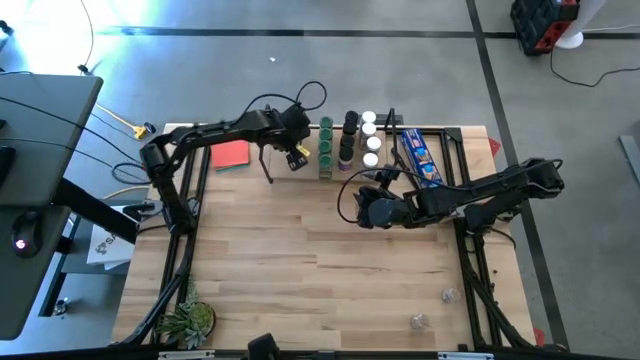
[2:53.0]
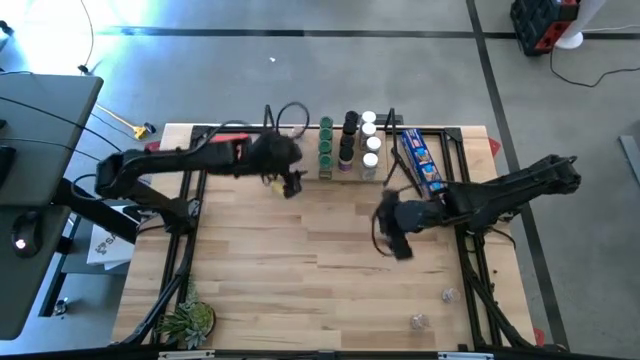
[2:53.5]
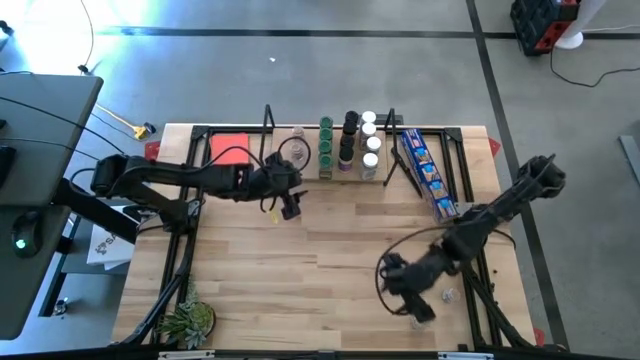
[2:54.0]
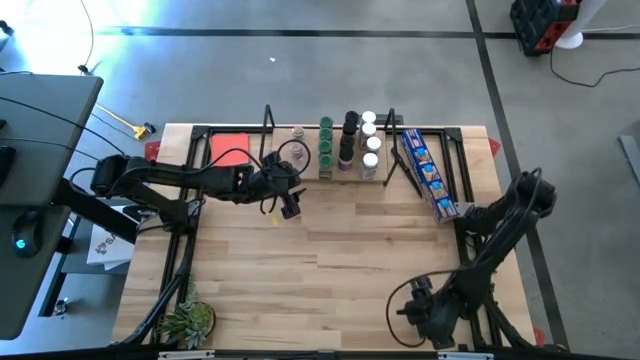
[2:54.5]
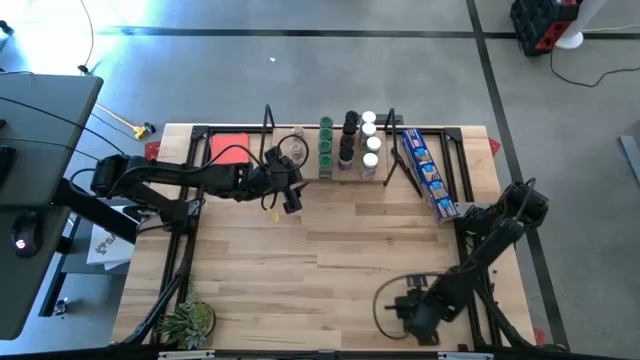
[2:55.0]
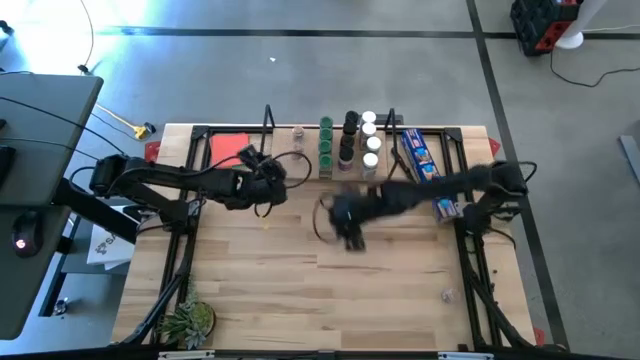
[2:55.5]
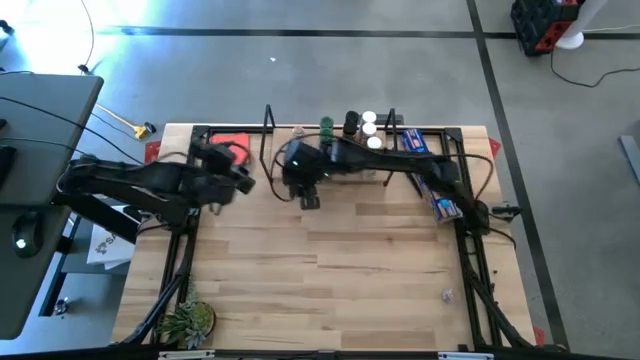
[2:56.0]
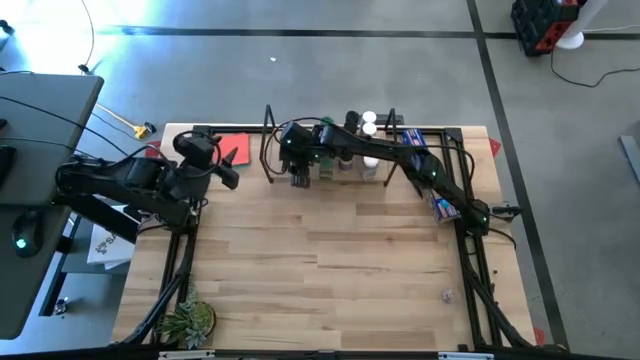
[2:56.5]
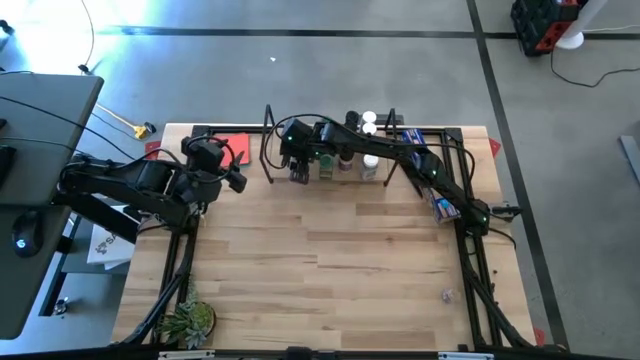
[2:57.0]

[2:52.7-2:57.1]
Task: Shelf spices
Put the left brown seasoning bottle on the shelf aligned with the other brown seasoning bottles

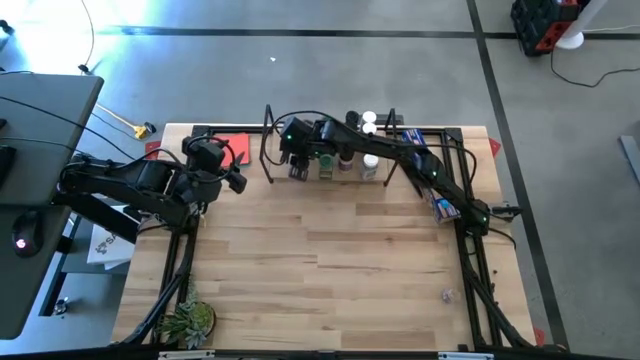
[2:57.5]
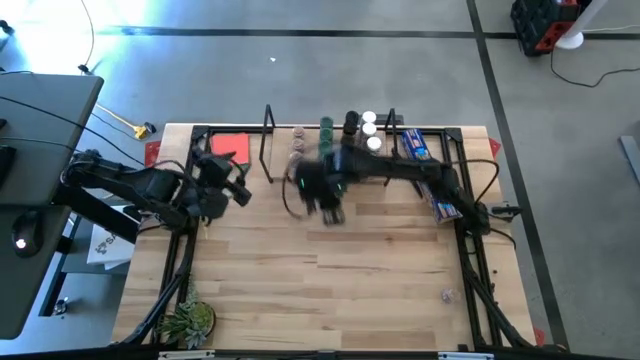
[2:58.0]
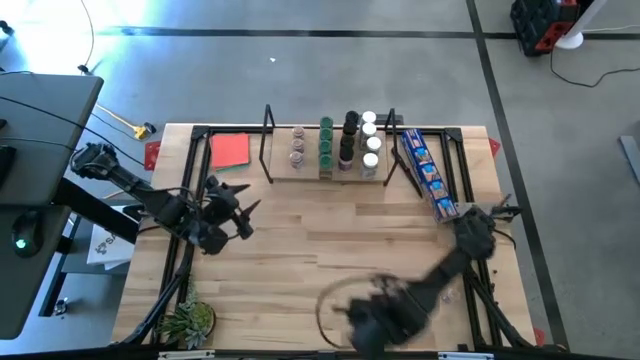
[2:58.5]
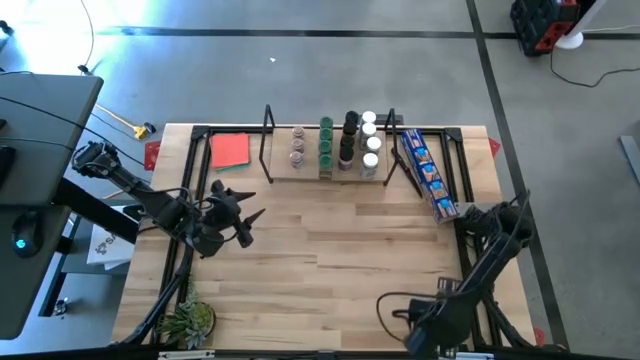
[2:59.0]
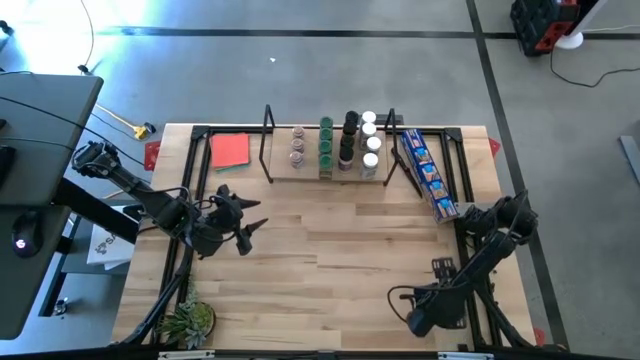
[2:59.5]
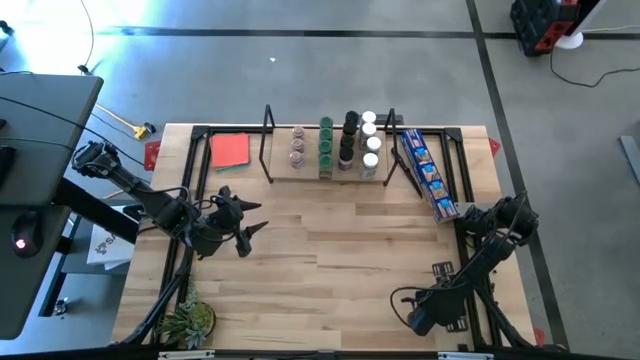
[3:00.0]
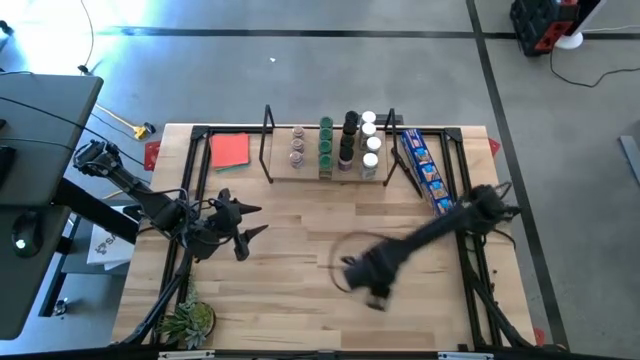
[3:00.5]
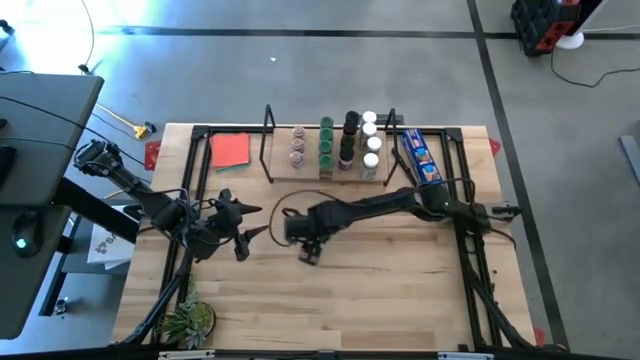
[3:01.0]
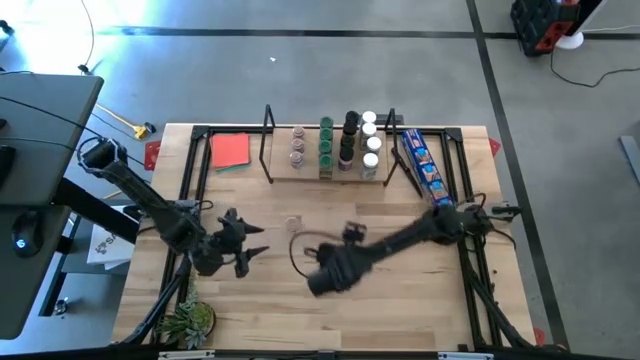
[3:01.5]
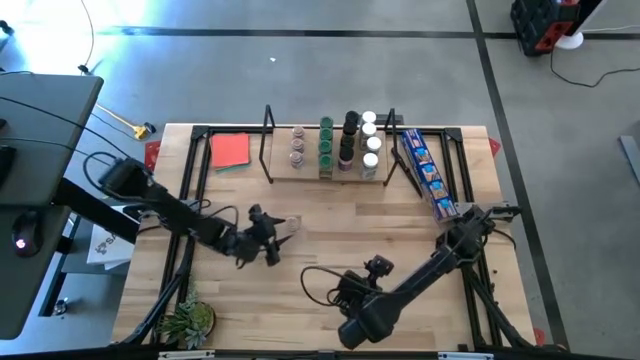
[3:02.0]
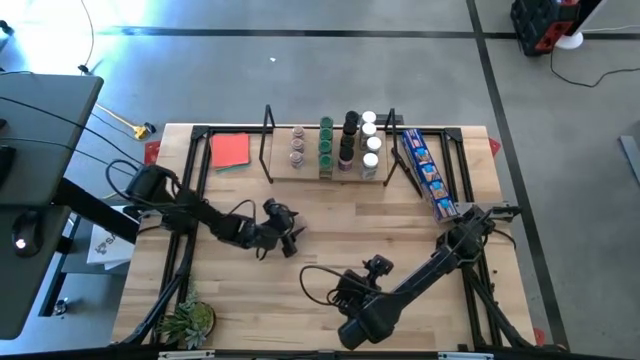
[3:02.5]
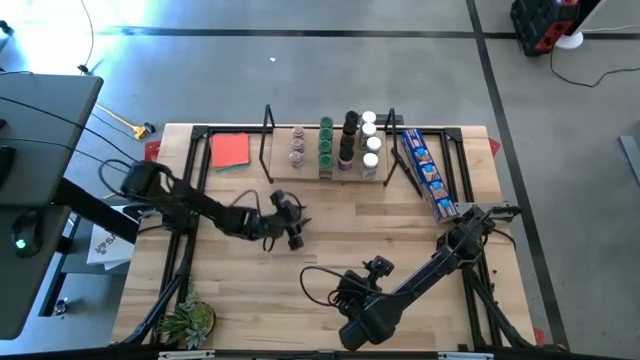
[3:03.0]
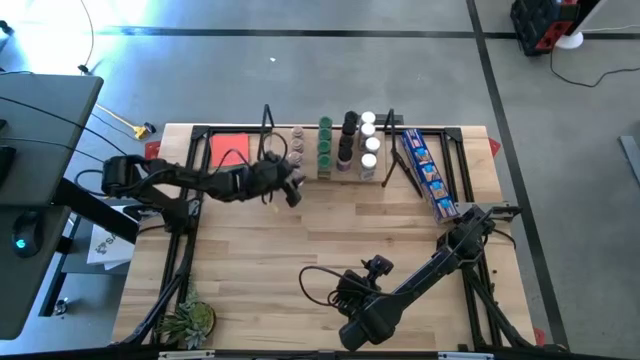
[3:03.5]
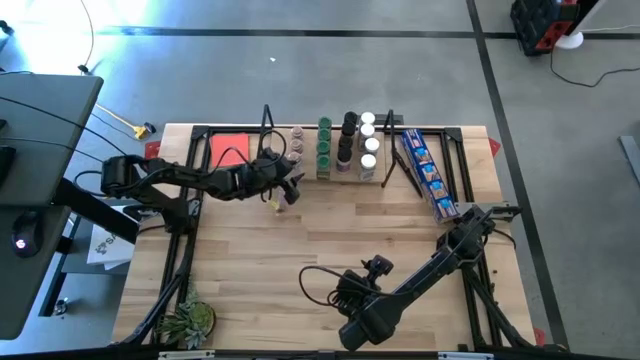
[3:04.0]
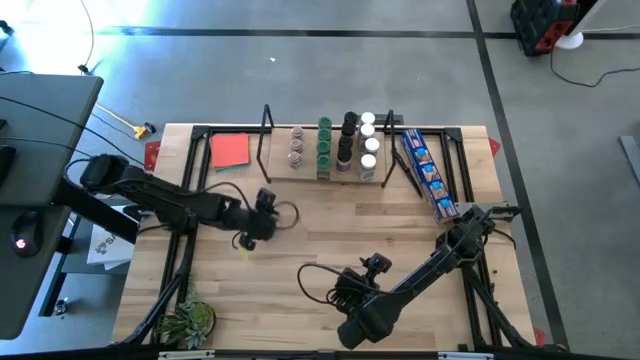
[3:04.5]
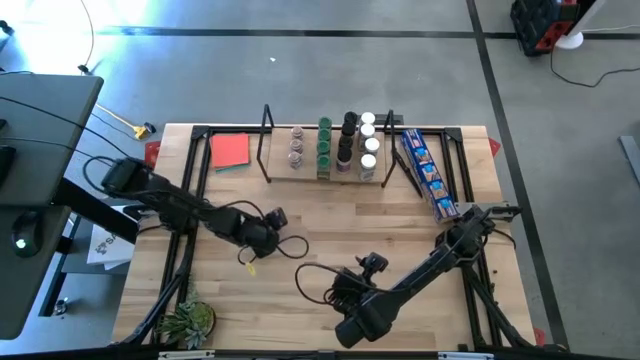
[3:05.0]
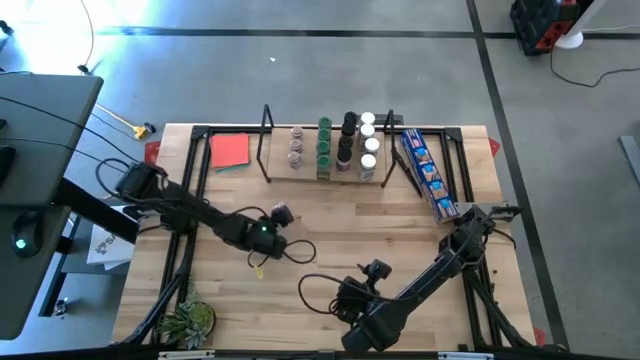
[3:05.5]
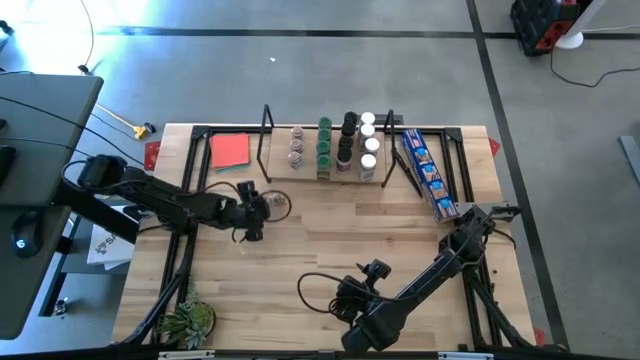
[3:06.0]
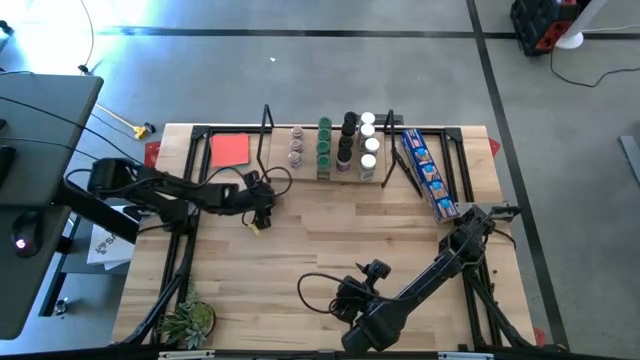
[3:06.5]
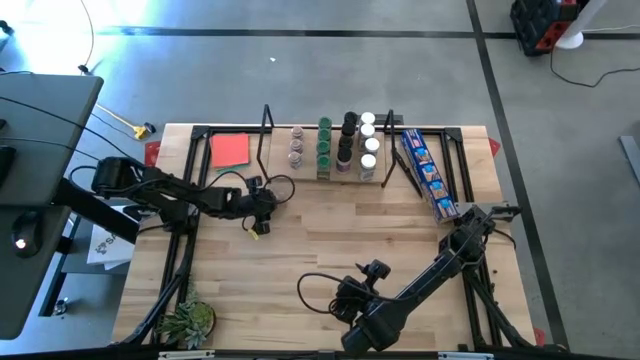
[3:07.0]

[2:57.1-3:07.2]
Put the brown seasoning bottle on the shelf aligned with the other brown seasoning bottles
